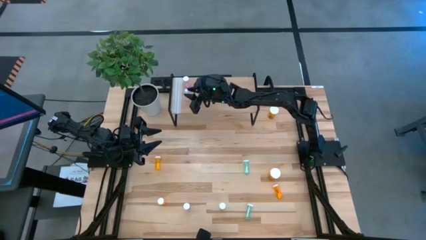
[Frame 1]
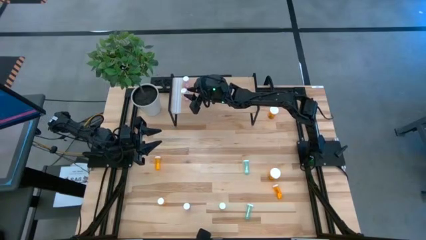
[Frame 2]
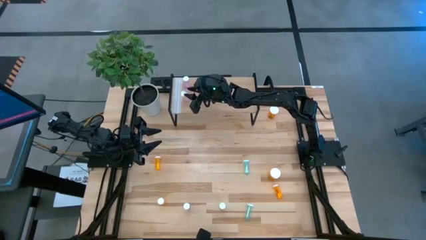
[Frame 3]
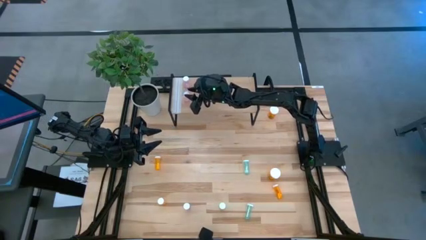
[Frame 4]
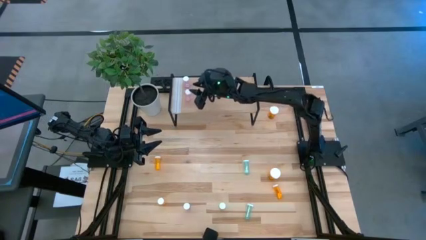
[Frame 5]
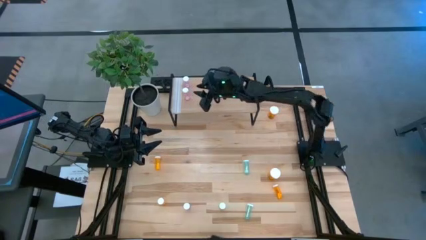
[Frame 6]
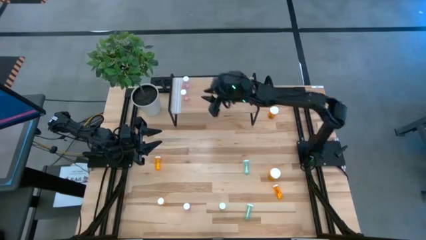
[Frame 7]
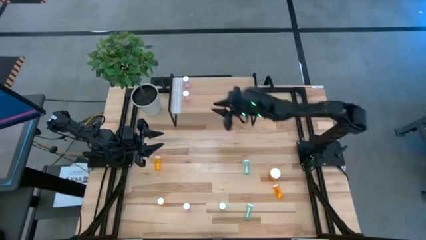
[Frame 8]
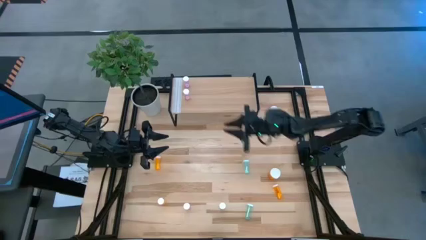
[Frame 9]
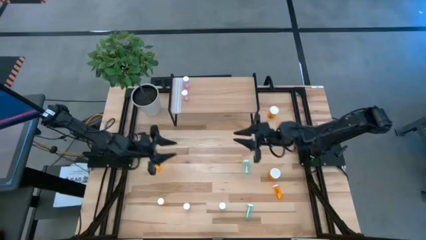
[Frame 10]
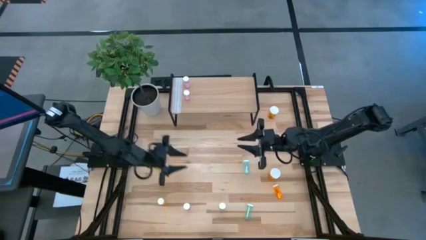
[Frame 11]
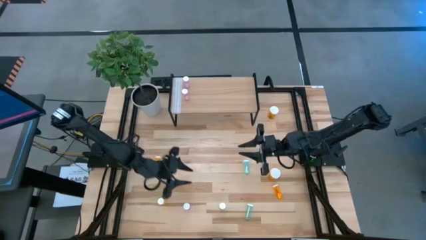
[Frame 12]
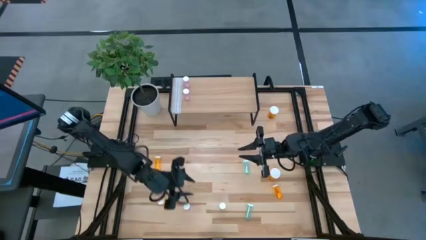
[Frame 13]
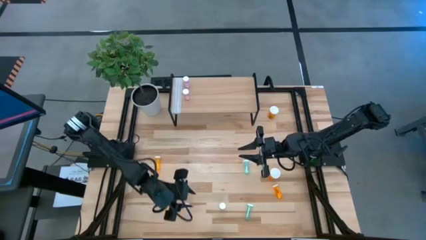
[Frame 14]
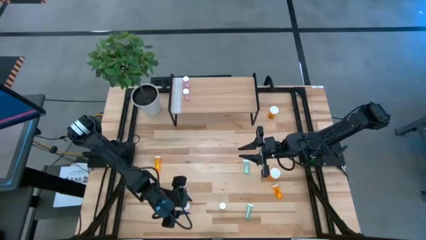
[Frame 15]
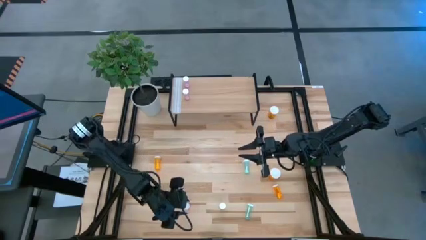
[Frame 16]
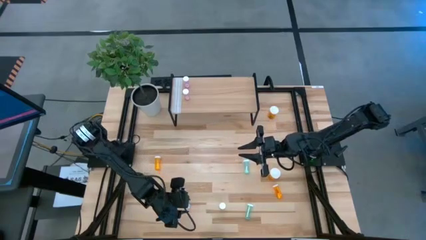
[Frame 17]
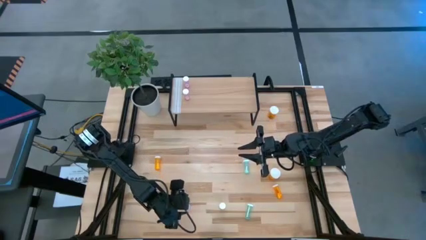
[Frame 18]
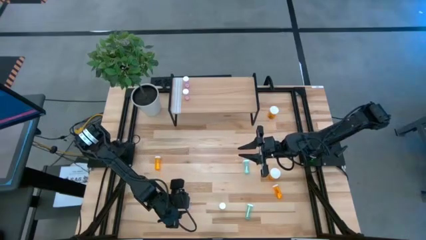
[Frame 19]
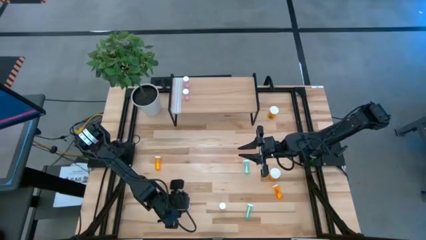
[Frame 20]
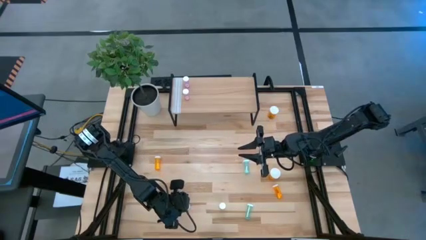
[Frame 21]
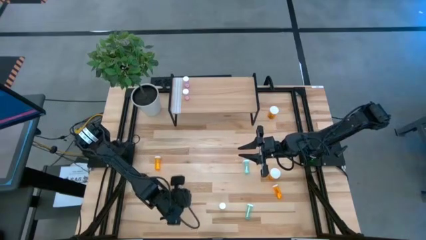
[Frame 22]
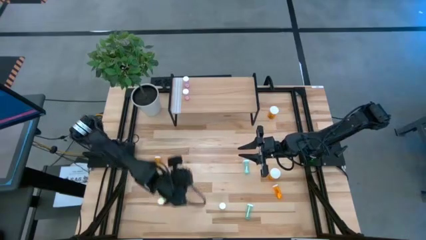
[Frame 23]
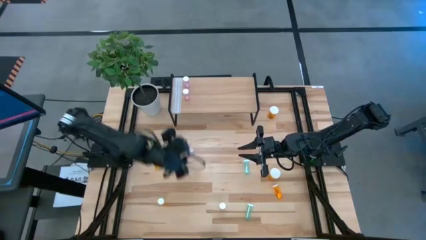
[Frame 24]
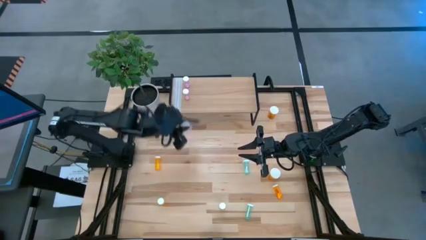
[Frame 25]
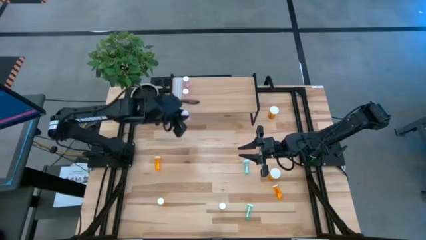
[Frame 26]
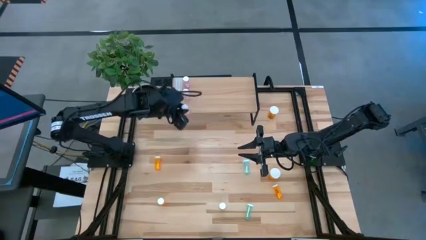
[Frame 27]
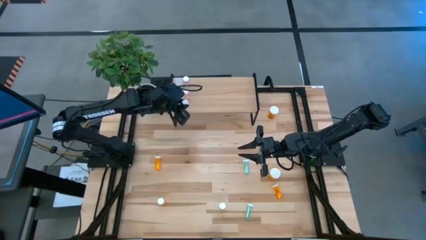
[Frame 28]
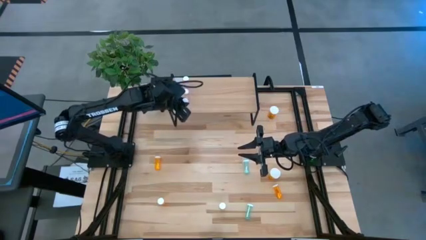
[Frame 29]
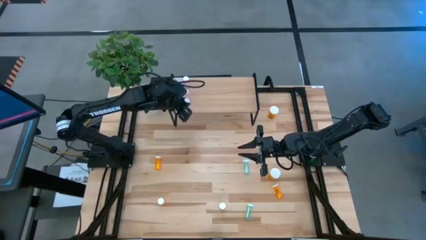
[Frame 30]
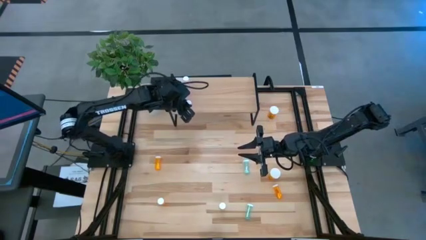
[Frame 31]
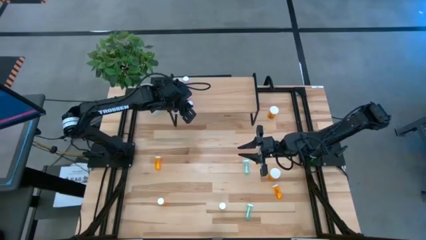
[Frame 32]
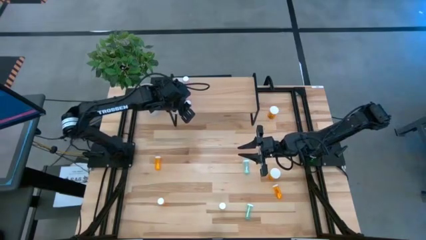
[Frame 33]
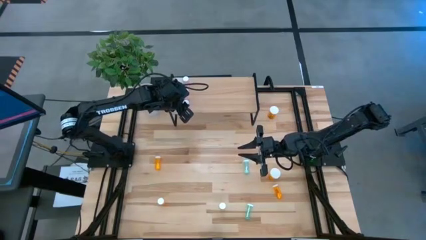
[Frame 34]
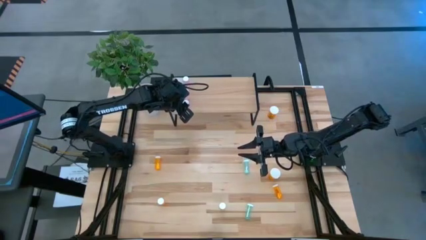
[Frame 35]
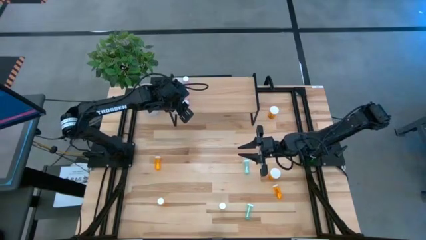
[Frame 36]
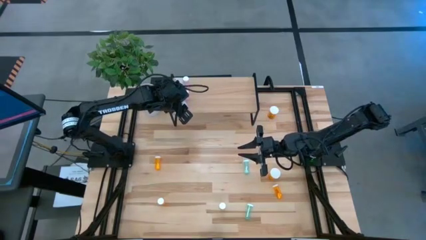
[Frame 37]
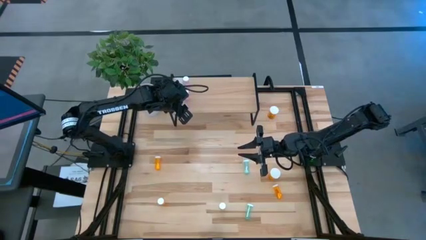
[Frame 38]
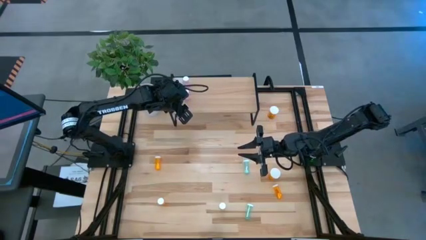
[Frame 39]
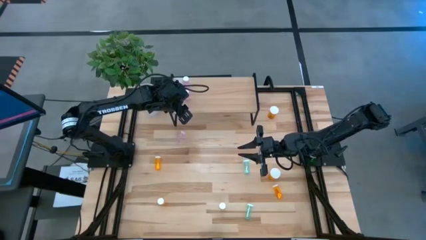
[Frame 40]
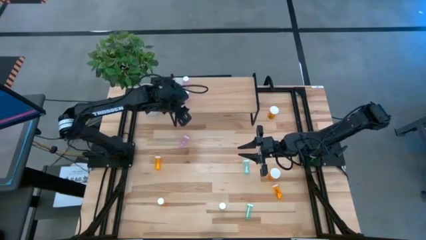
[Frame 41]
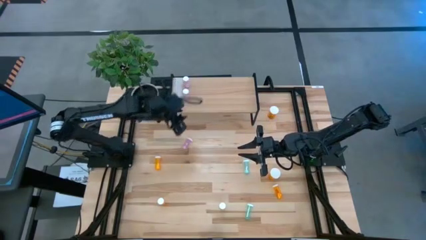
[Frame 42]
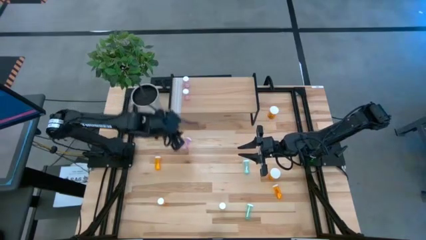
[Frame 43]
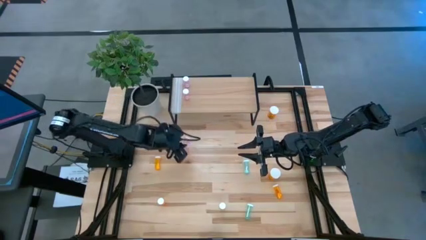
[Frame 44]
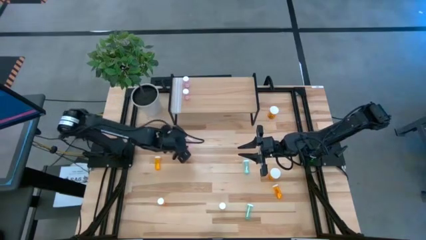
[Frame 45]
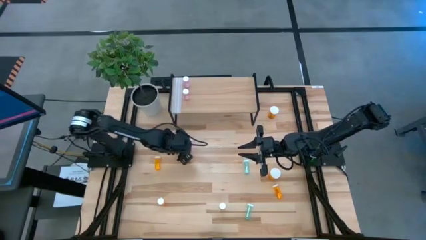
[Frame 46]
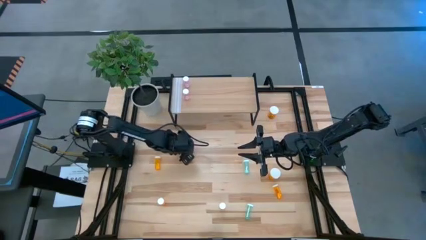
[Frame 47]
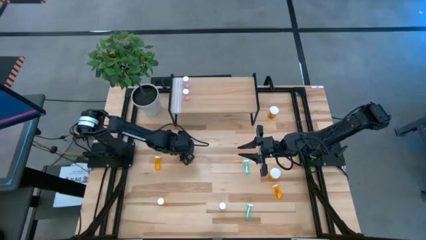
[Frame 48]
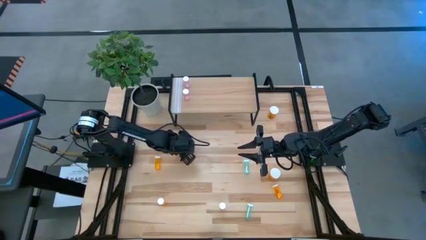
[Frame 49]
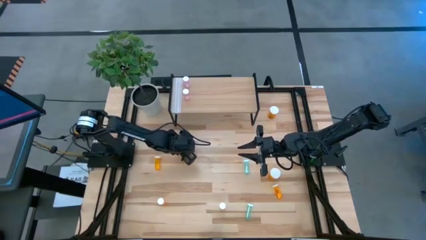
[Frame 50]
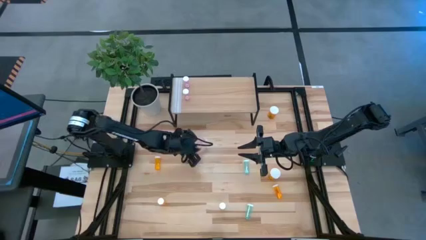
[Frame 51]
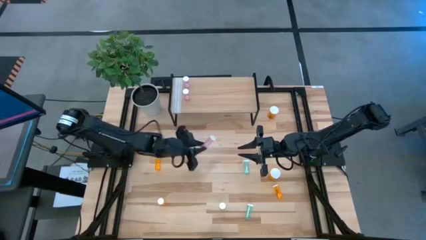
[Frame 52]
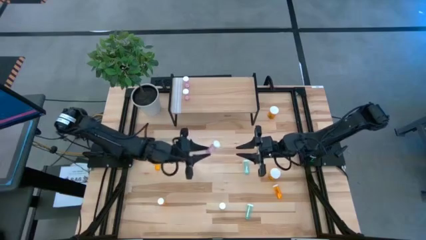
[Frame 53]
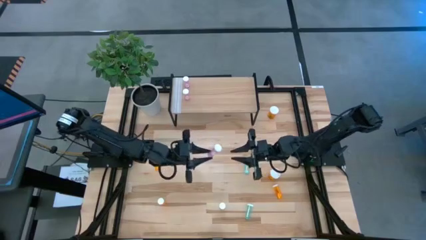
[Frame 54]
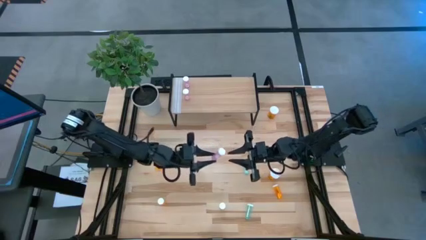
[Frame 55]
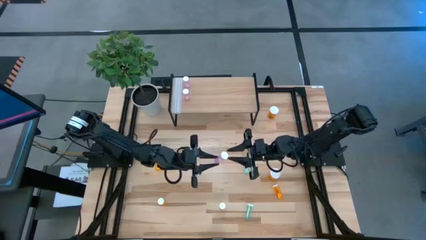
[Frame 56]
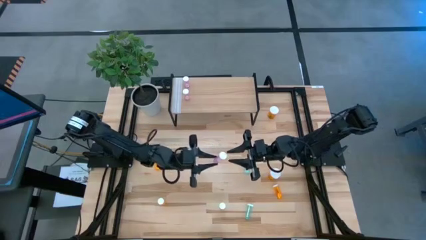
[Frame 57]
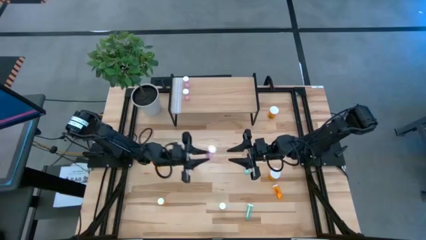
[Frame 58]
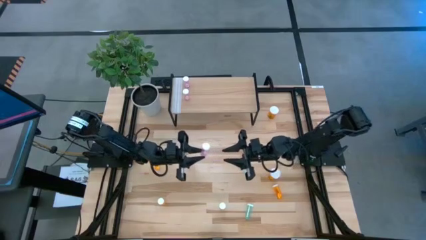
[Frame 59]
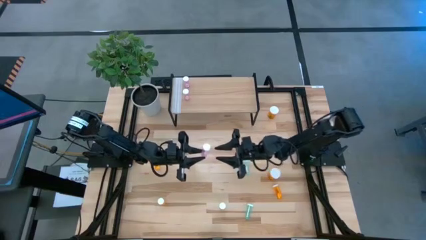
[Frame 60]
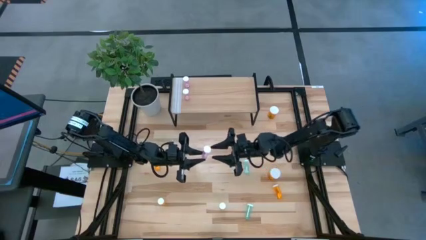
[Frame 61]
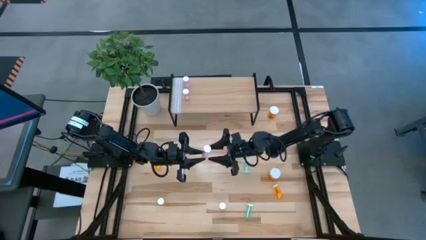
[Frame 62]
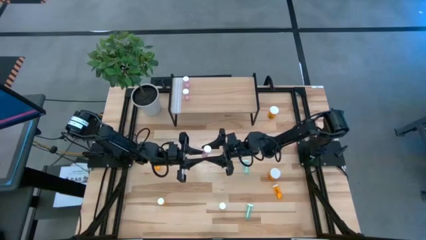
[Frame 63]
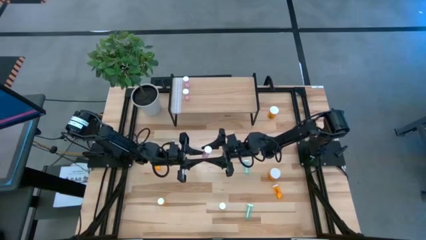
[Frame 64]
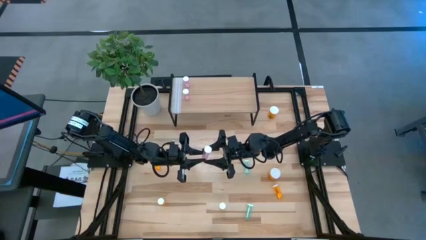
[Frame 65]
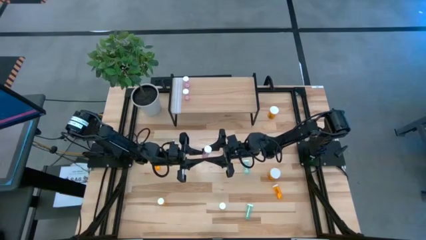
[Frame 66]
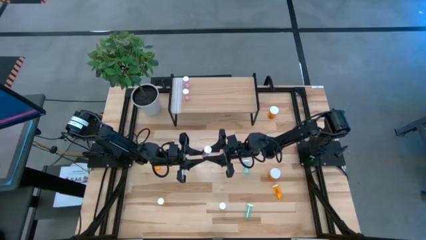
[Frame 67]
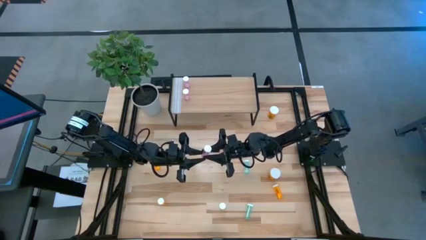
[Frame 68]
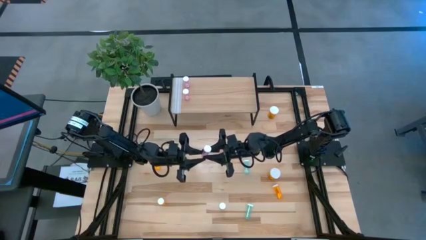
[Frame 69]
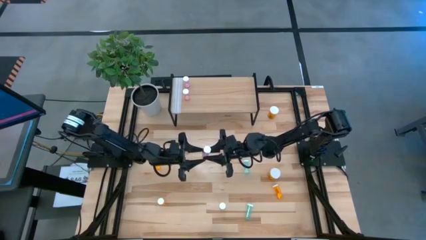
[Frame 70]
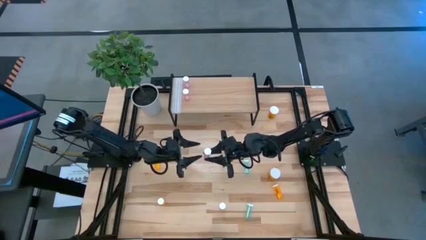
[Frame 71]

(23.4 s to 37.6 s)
Task: Pick and place medicine bottles onto shelf by color
Put the pink pill bottle aligned with the other pink pill bottles on the shelf
